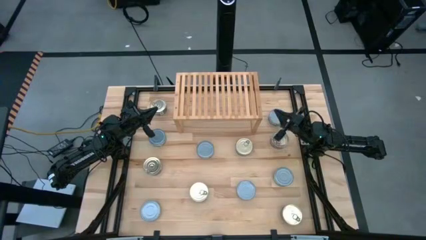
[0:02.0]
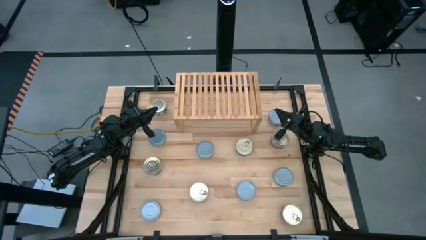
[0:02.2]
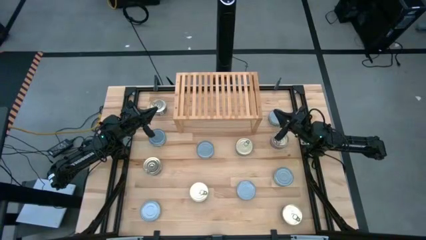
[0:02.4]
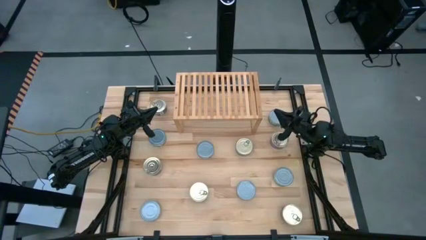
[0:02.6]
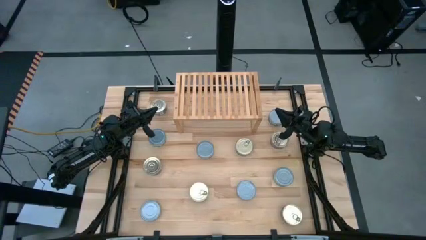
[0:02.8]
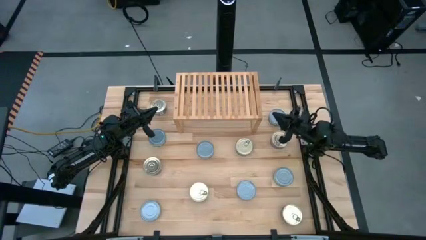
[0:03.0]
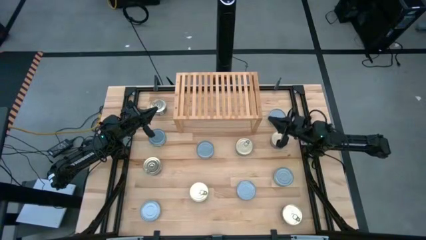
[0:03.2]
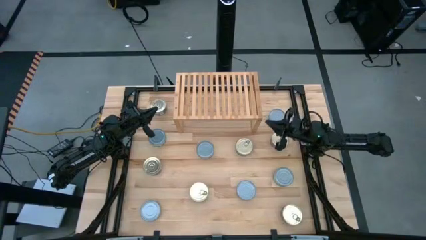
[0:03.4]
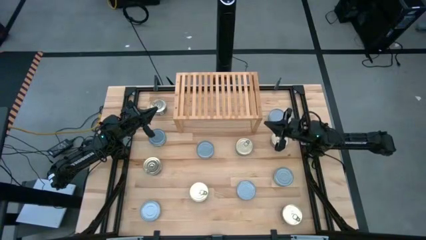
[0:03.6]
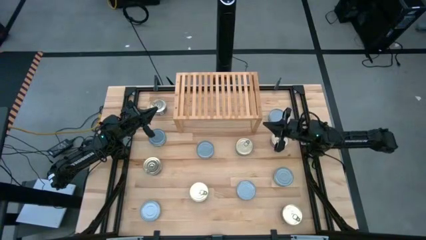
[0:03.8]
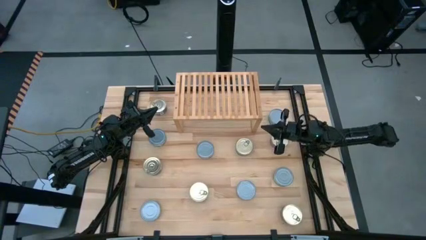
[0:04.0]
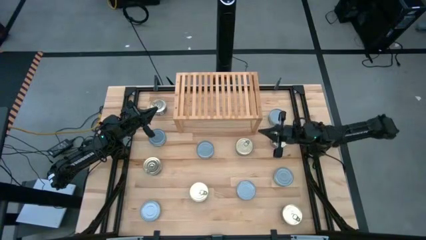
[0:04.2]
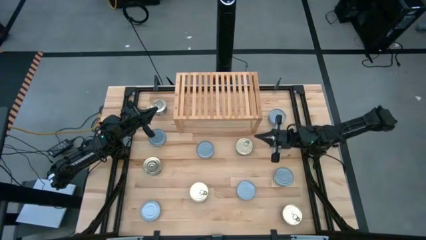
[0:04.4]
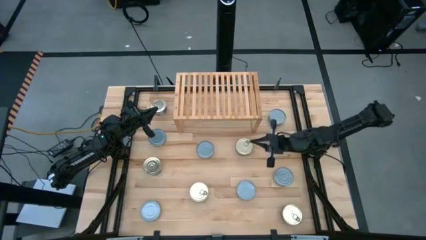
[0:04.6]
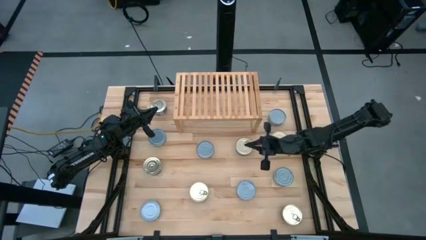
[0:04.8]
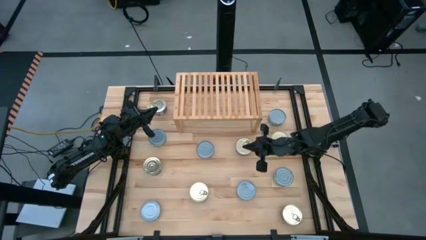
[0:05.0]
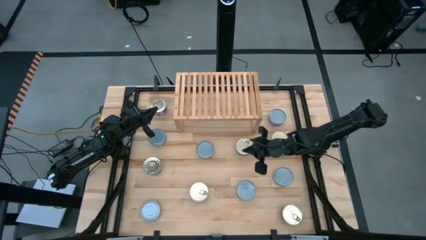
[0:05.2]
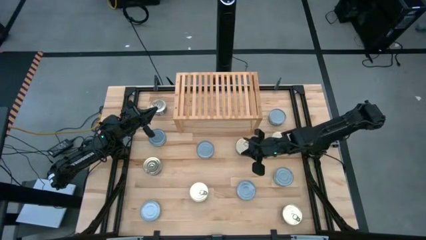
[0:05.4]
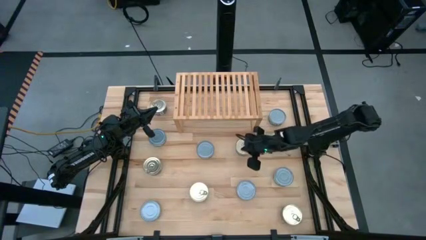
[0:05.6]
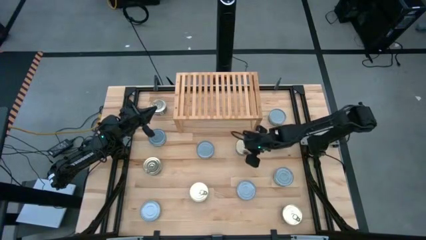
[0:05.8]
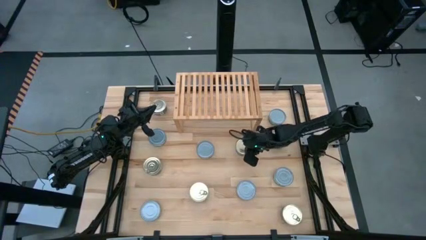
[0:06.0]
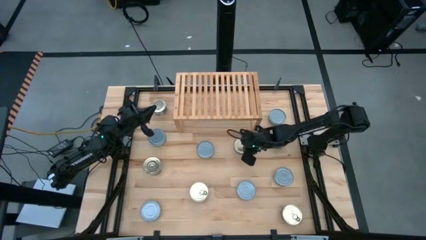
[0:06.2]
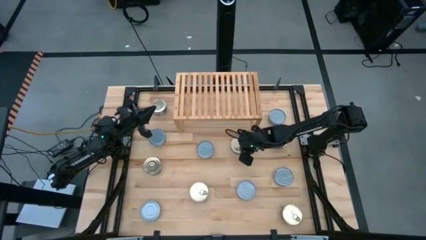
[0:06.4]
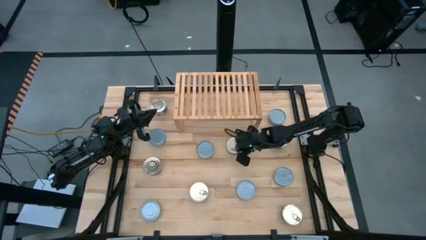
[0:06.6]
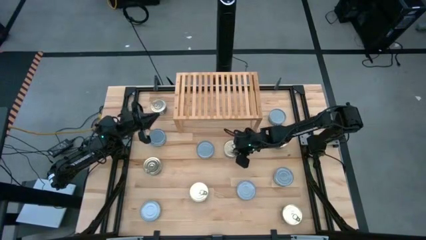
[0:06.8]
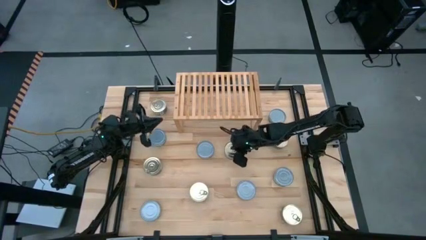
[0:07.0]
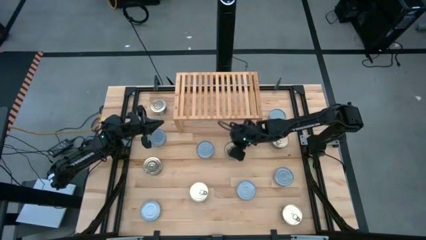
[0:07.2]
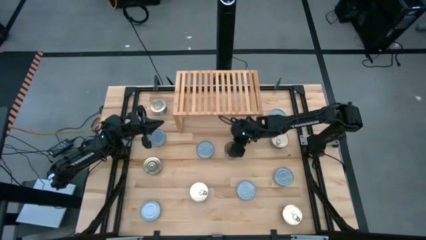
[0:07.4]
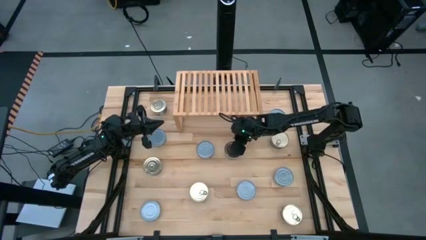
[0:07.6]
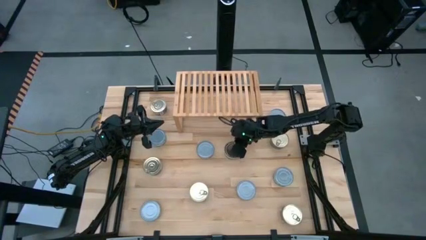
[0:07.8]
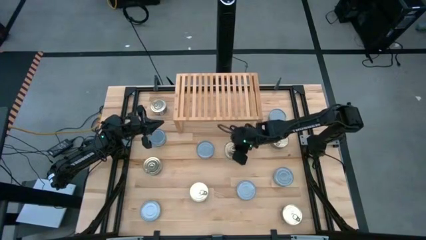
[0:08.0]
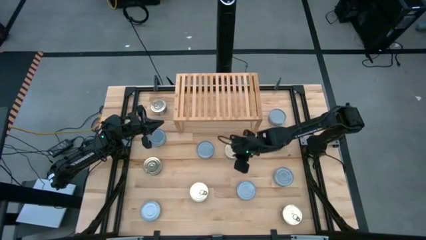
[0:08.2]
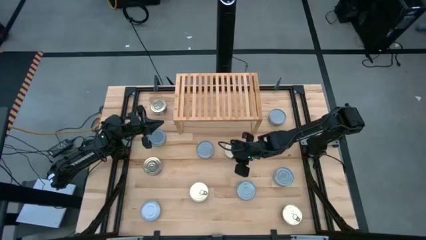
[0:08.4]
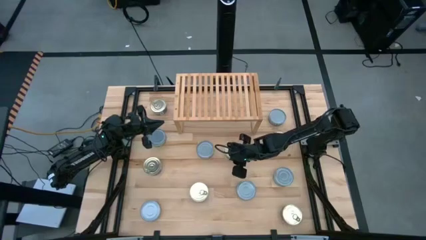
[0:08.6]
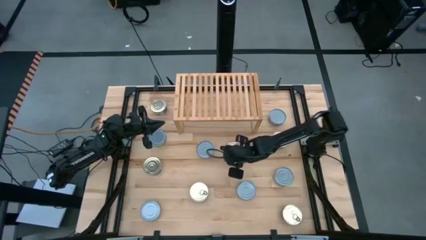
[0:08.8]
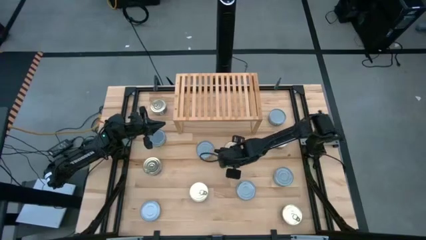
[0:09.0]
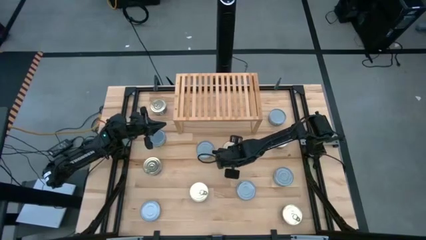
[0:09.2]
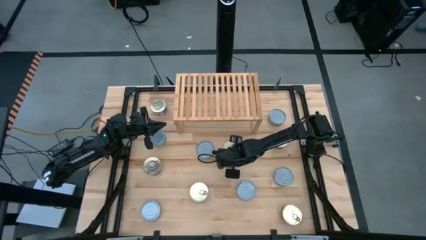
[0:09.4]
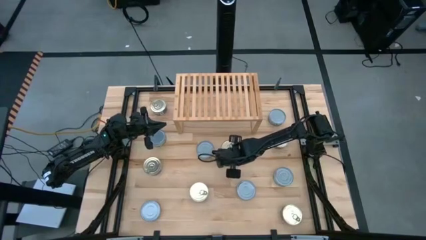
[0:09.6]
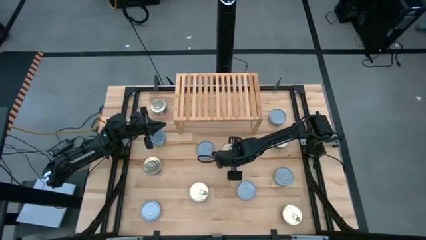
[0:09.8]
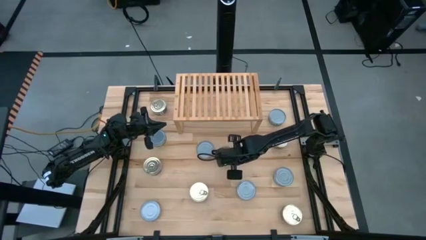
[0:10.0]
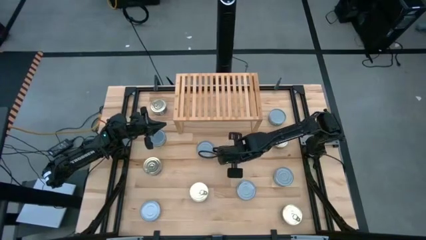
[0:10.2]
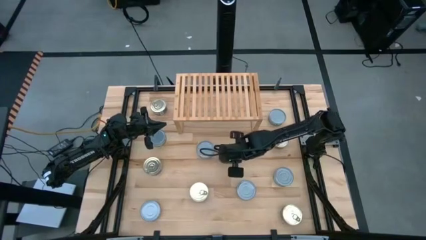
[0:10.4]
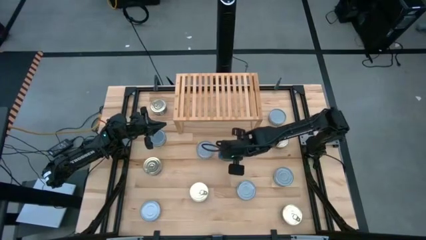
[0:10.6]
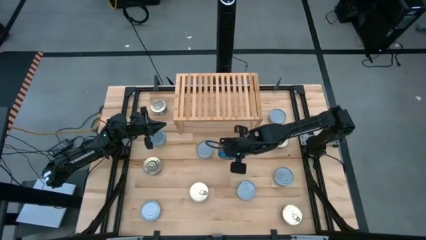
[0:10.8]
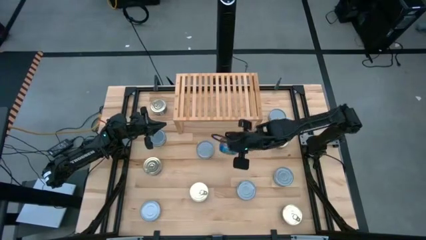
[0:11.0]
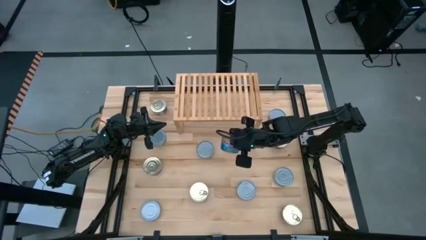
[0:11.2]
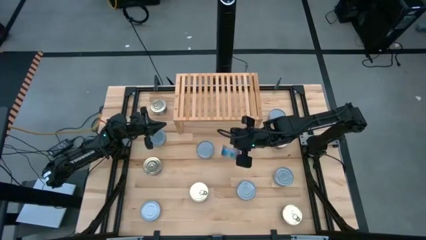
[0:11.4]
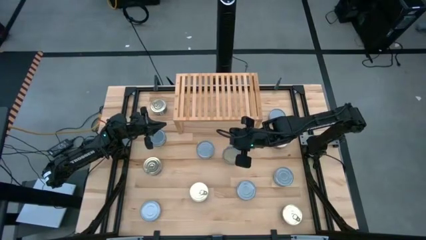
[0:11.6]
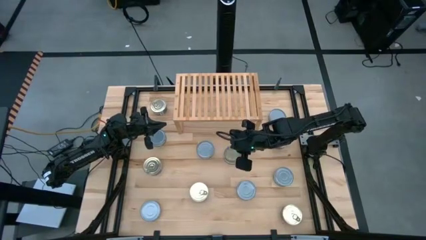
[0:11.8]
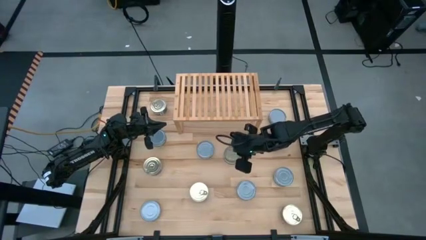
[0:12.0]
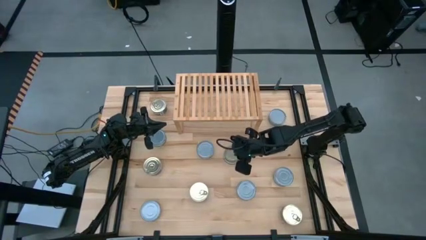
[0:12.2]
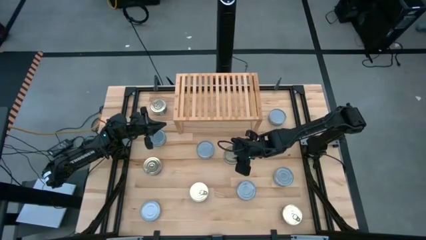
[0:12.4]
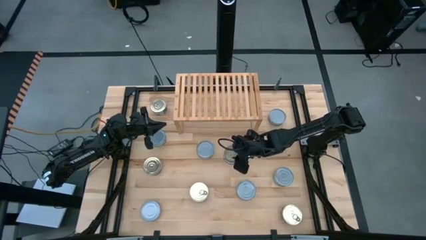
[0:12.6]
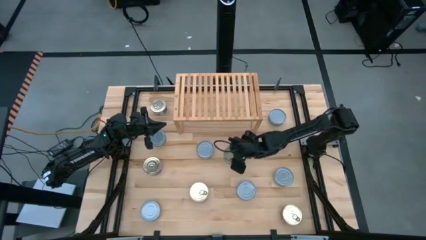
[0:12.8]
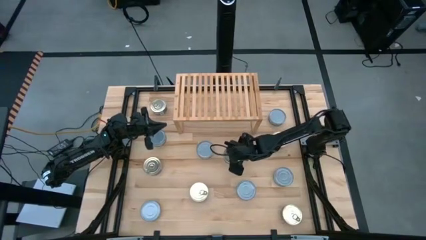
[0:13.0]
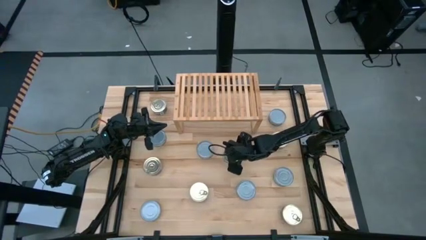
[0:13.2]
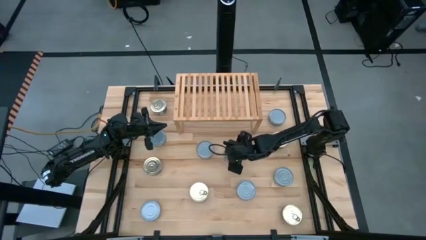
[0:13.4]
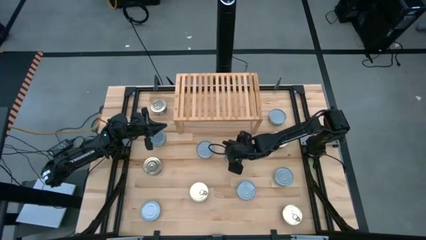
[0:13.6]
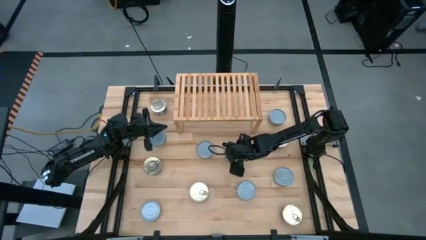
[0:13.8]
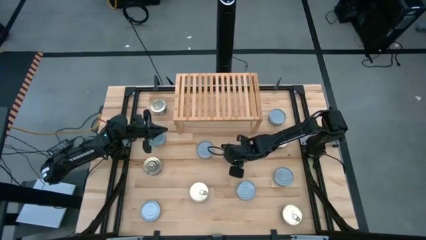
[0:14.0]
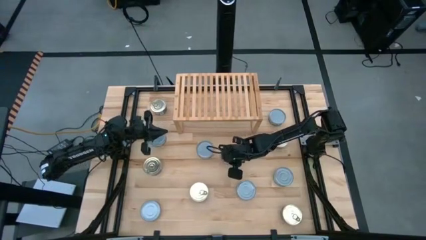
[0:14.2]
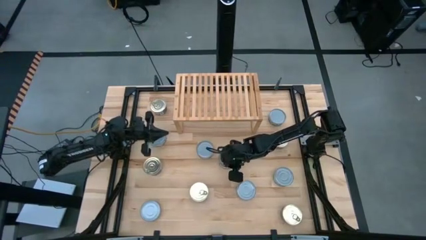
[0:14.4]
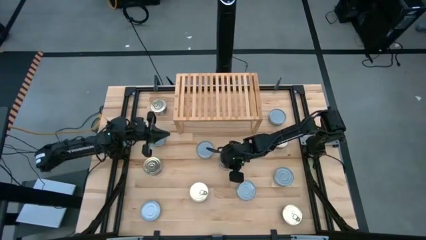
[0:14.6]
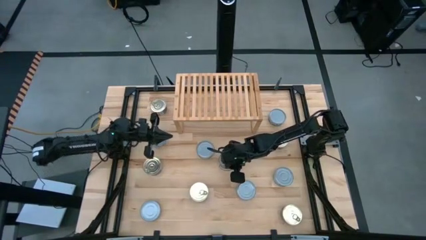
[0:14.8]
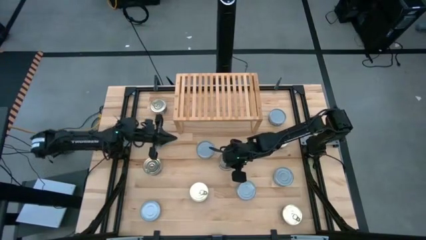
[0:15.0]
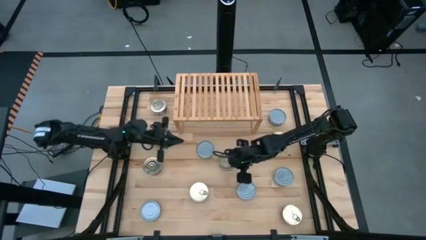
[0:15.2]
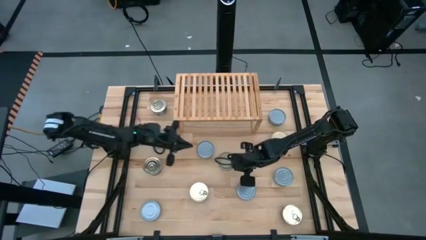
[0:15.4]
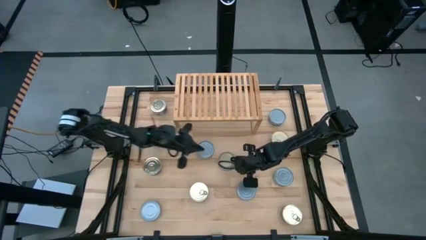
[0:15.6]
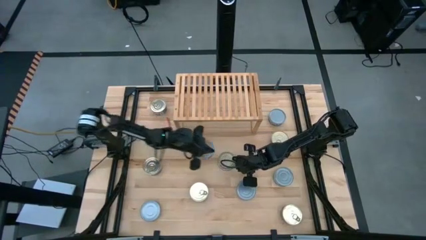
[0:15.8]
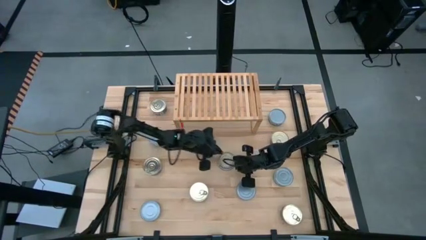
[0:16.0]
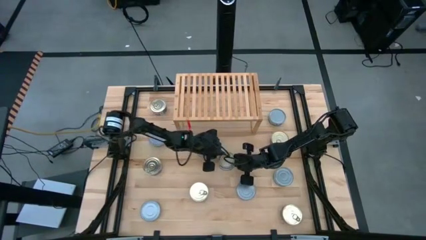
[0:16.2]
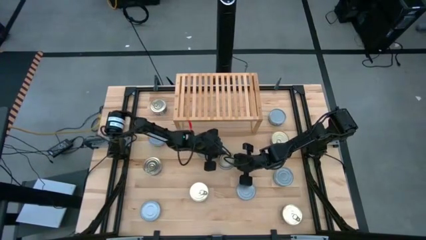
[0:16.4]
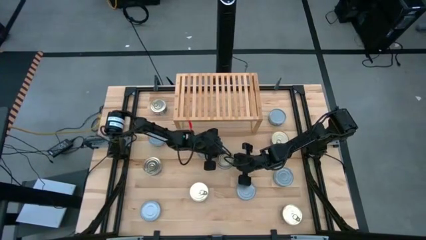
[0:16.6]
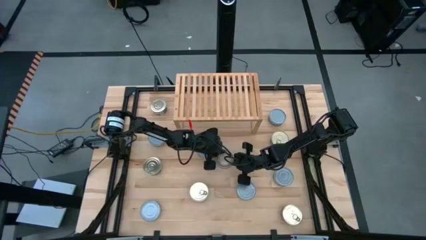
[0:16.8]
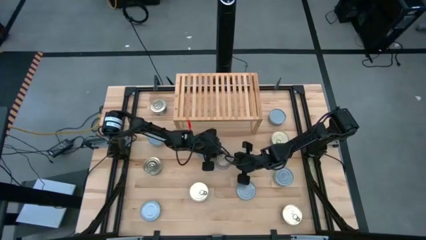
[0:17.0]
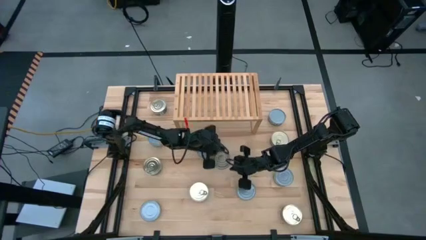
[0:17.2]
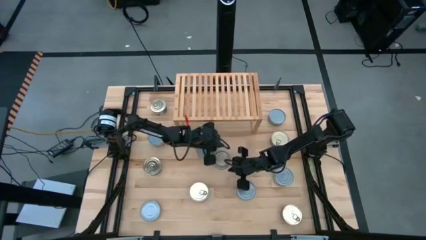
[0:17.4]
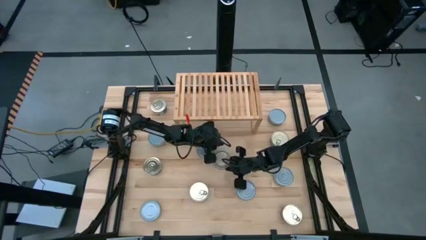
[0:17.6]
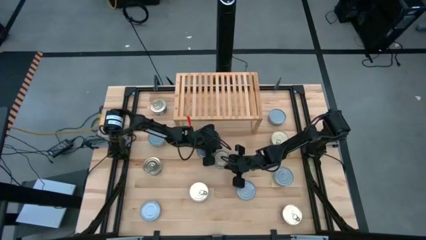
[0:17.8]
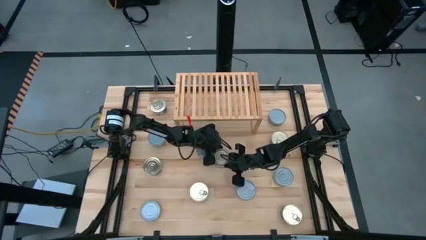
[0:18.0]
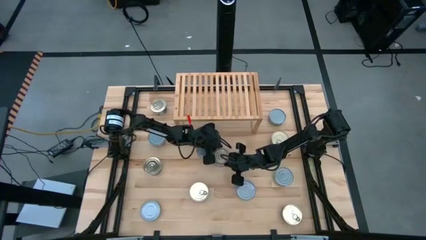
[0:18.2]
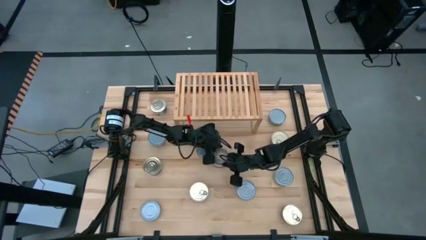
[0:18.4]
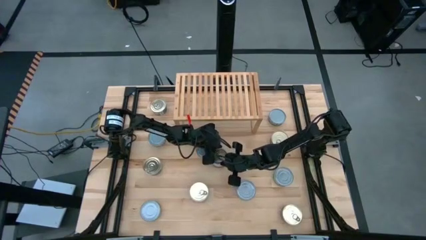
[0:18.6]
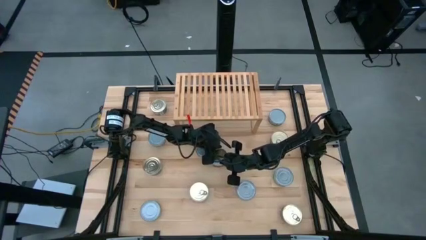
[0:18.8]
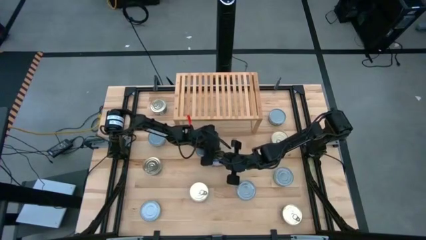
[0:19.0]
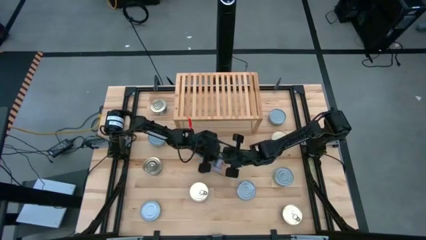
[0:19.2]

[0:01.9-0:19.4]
Task: Stack canned seafood by type on shelf
Put the blue-pink tuna can on the shelf
